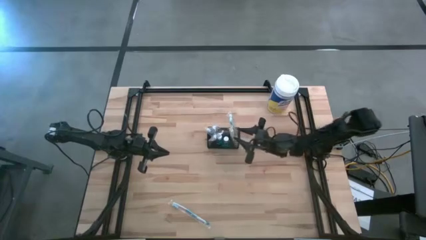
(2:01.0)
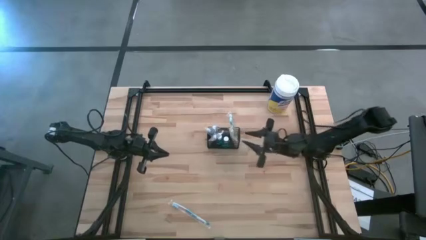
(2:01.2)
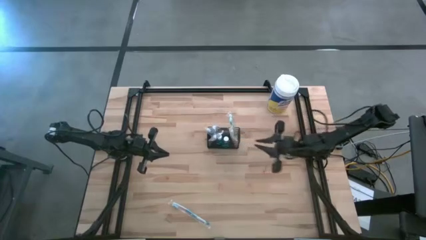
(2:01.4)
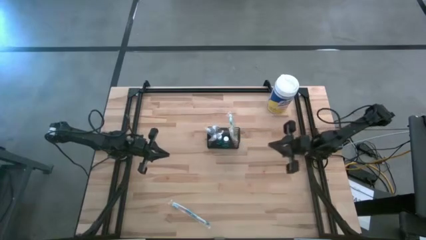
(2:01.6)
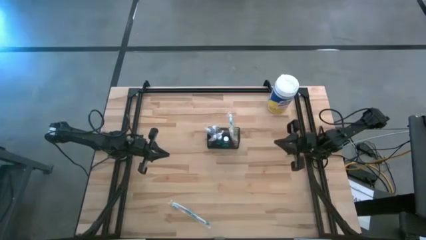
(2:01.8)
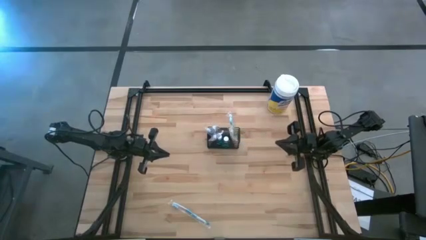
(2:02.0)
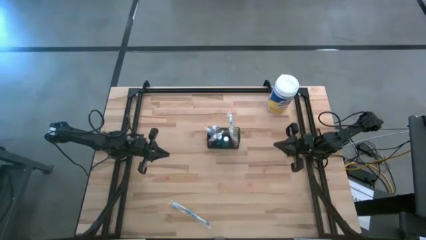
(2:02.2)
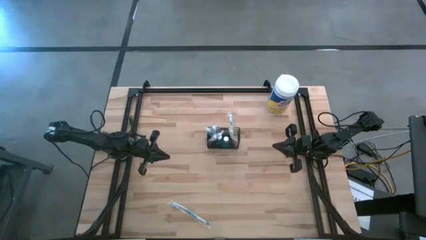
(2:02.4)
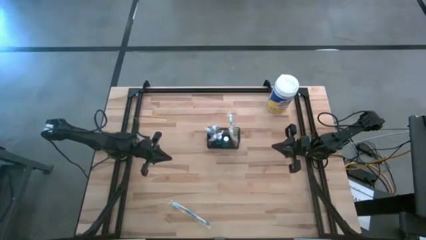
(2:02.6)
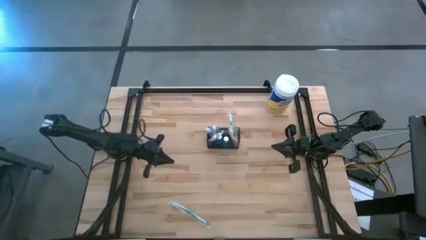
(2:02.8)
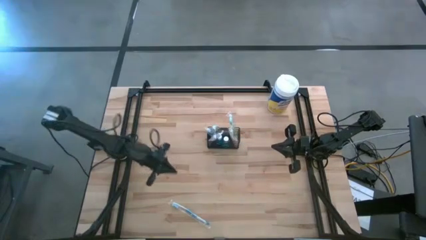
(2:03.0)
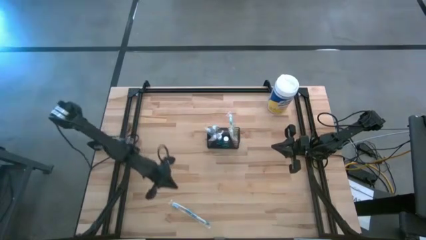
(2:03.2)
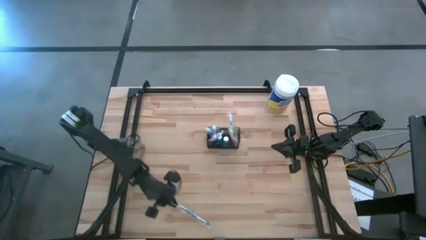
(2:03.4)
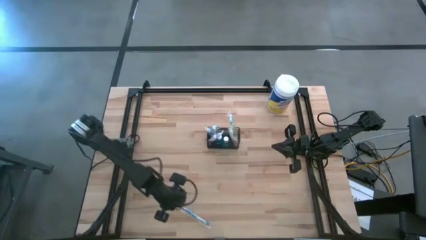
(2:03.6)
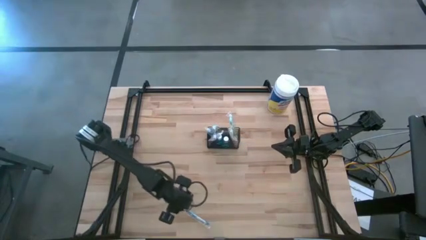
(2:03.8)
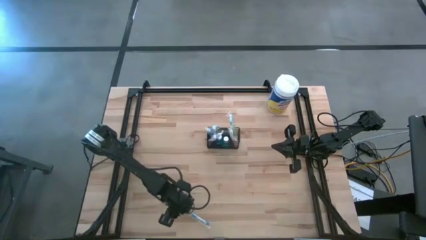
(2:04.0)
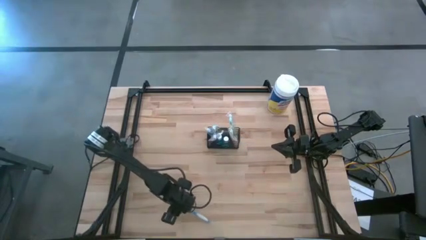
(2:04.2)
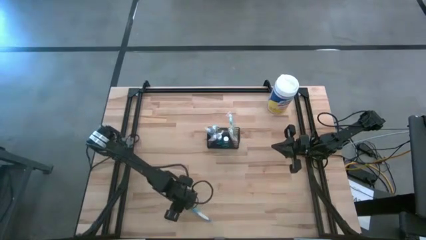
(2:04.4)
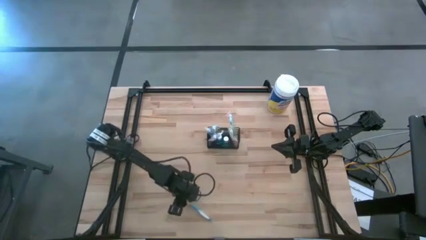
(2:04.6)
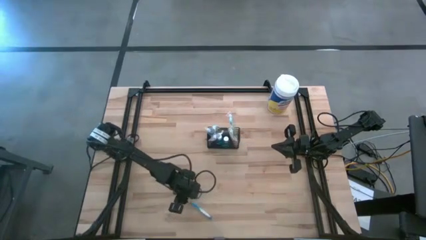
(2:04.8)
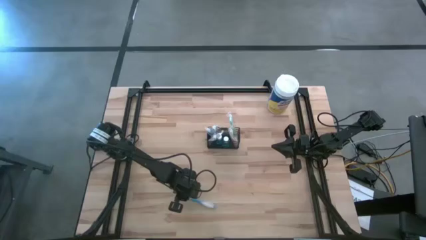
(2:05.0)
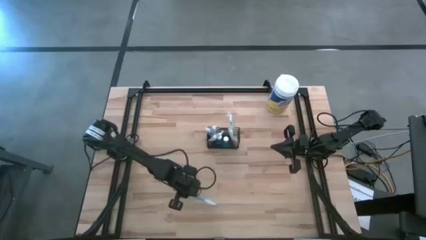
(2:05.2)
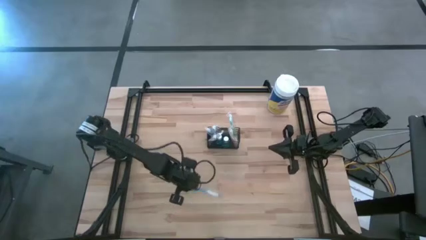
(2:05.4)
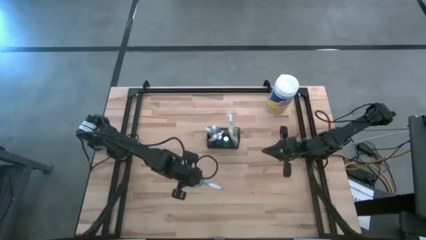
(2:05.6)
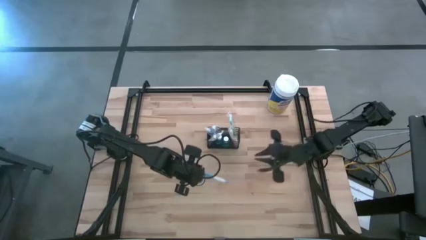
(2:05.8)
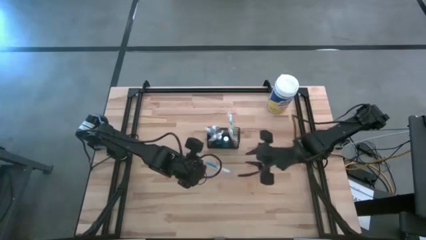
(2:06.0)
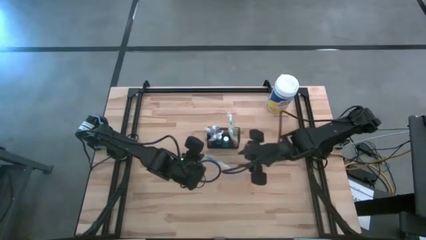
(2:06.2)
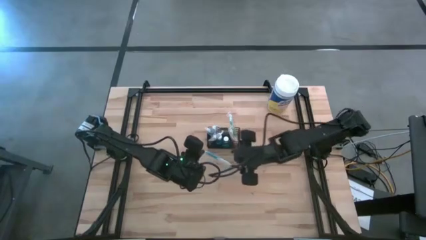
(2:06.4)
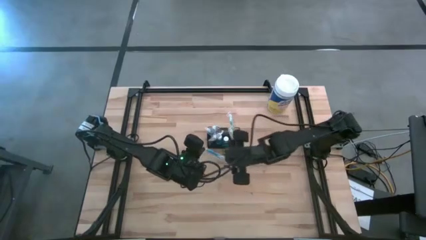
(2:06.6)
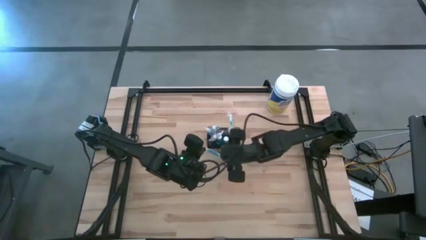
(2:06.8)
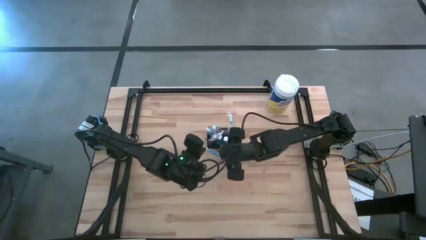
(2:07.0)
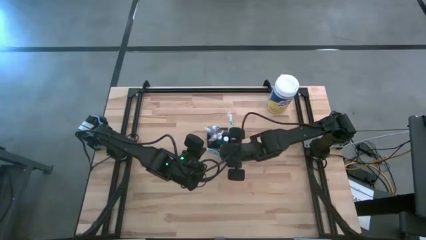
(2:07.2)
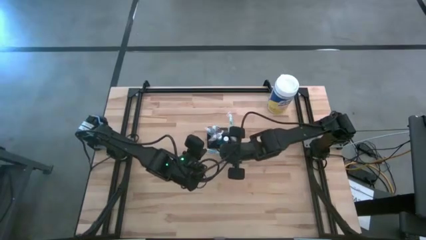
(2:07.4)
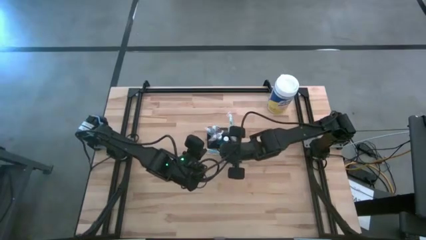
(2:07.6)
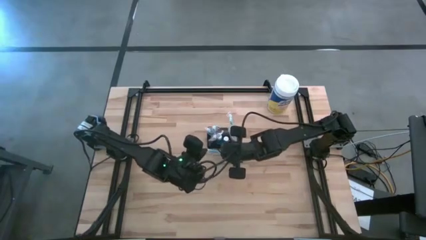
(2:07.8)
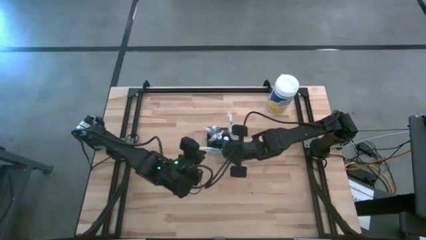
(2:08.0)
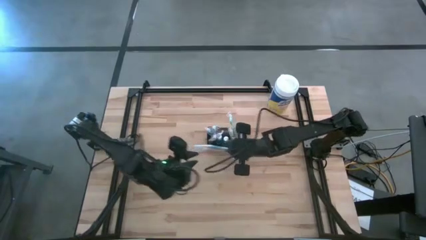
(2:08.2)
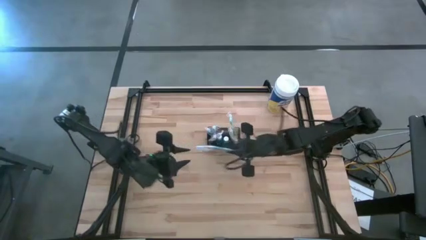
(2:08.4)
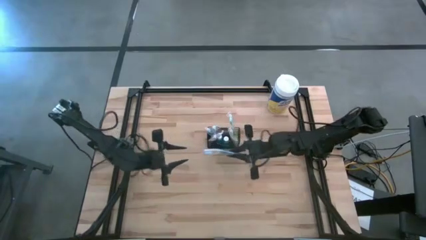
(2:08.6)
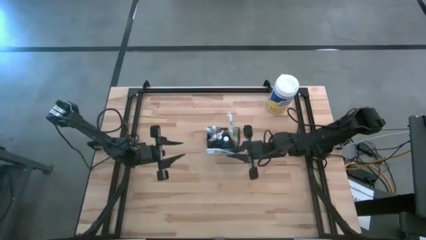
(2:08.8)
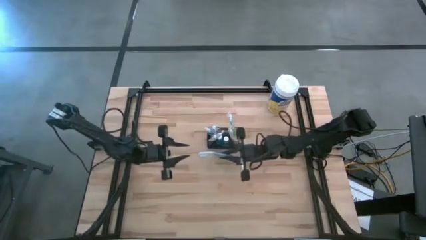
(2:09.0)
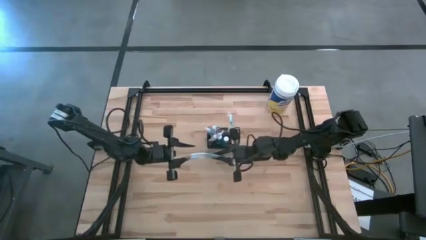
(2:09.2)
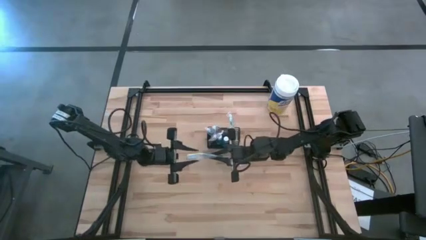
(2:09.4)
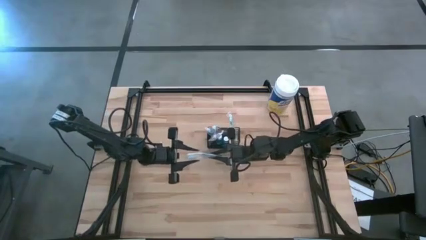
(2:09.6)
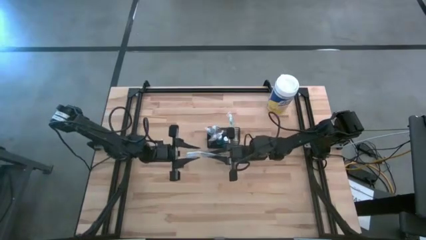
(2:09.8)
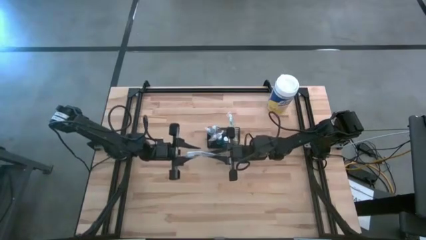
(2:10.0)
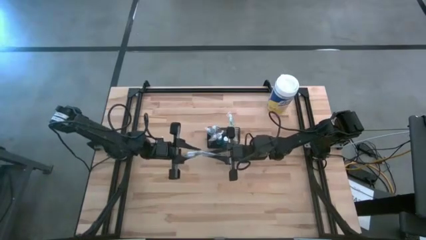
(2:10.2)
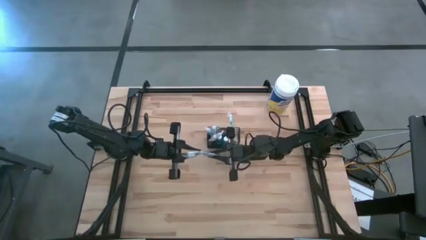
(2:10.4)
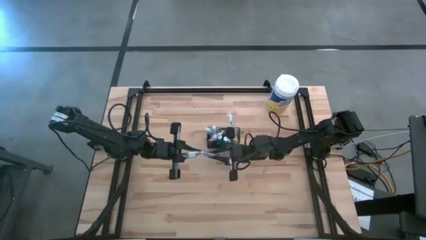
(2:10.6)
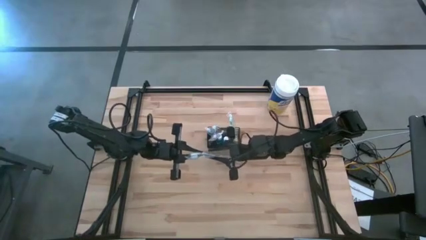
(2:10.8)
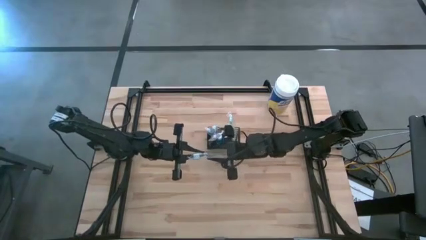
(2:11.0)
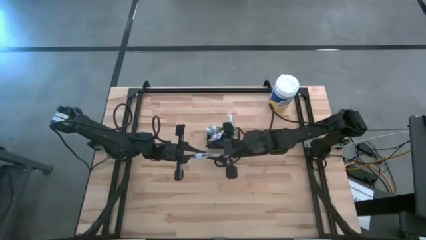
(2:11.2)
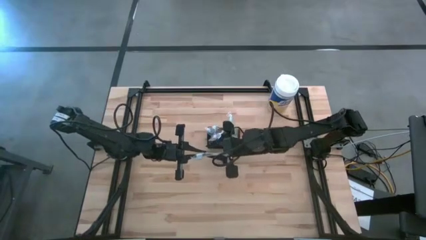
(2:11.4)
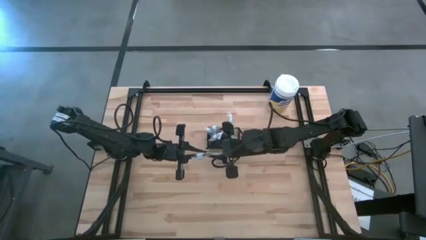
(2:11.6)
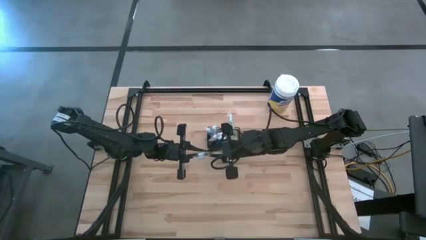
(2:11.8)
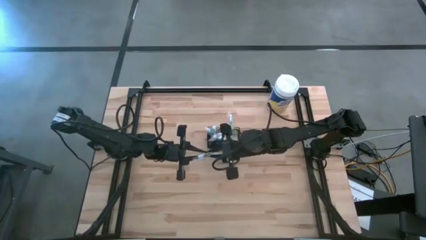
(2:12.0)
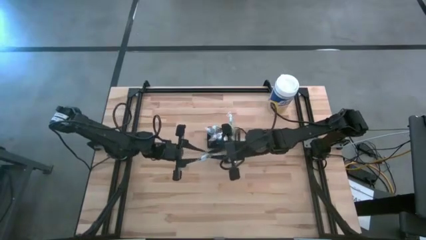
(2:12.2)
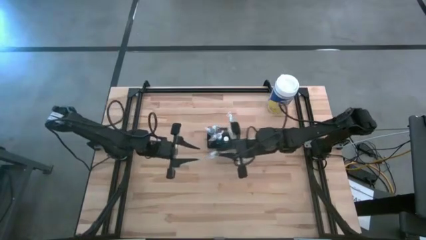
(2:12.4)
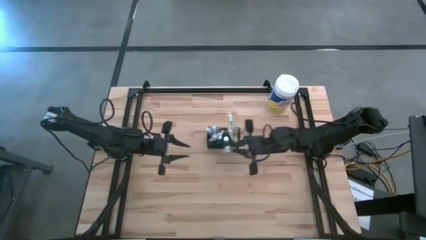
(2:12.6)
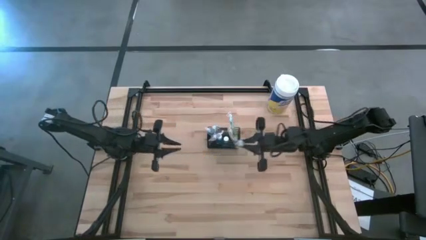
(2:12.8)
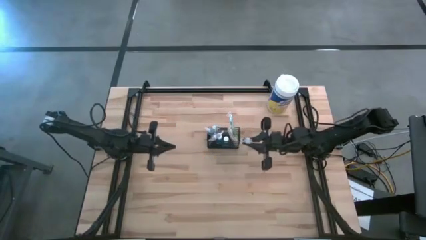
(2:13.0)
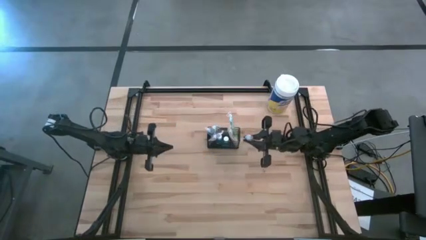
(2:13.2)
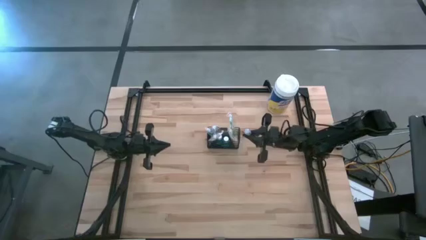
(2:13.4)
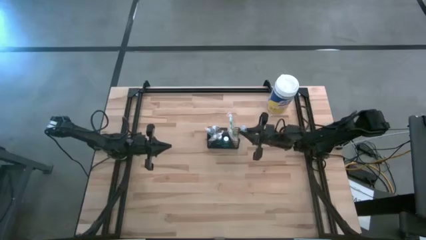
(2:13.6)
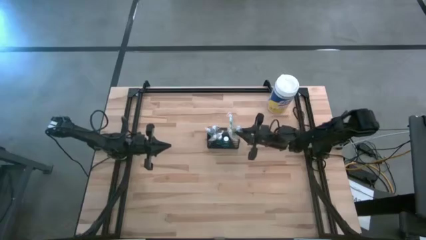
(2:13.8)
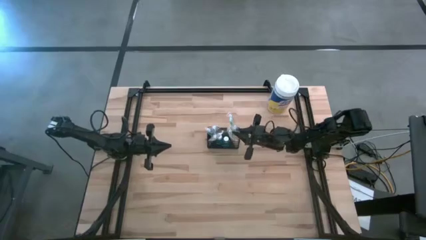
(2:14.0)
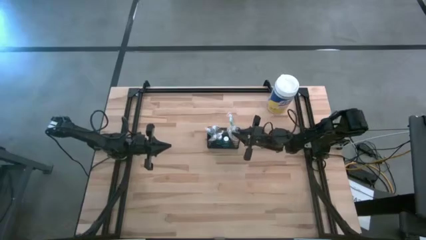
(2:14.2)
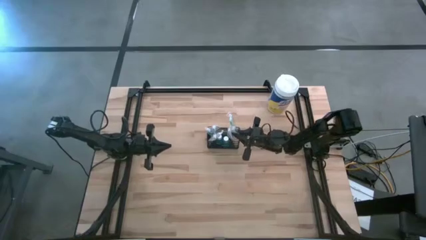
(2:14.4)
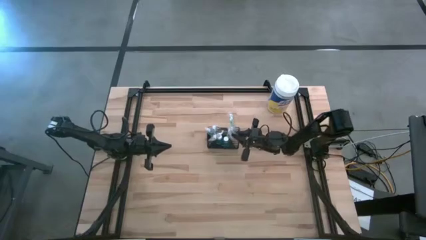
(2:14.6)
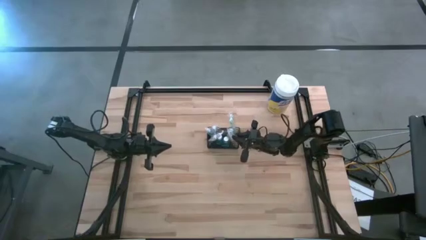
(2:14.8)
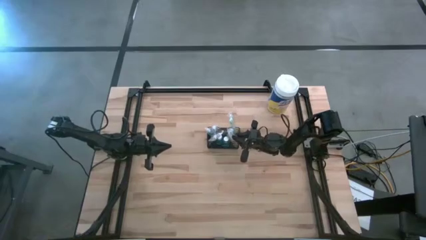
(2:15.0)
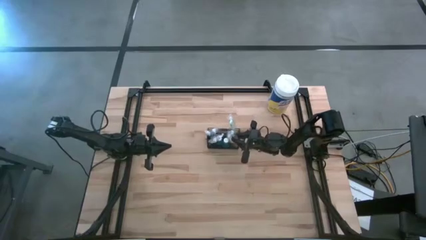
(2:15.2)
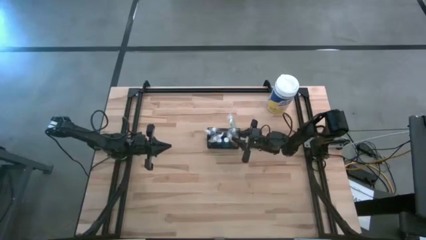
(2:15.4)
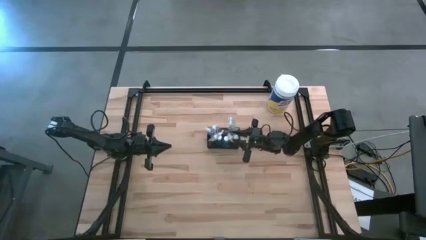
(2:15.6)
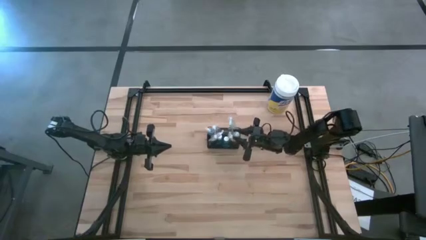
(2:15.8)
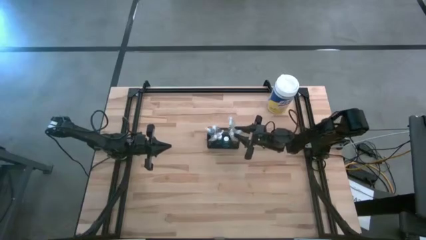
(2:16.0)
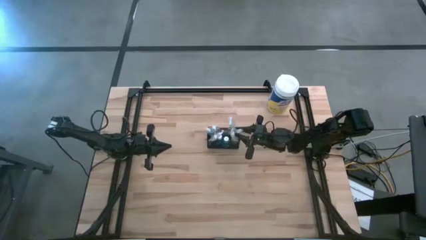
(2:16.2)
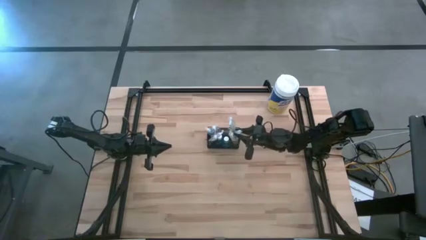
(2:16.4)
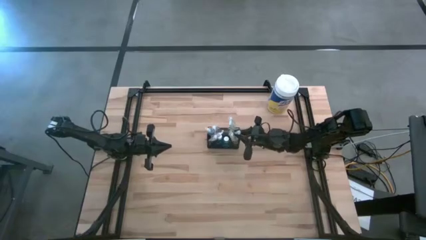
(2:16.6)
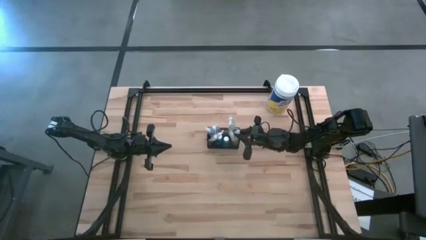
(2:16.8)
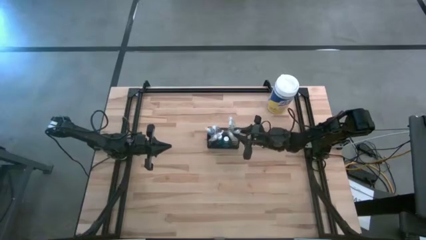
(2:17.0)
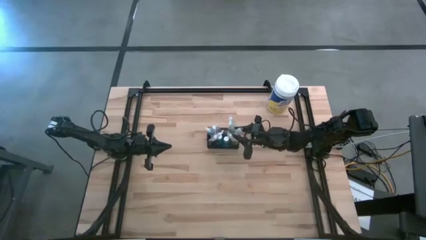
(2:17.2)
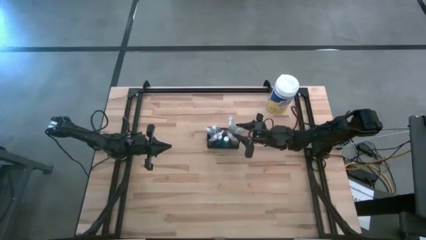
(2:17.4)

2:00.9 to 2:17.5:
Task: Pick & Place toothbrushing station
Put the blue toothbrush into the wire organizer
